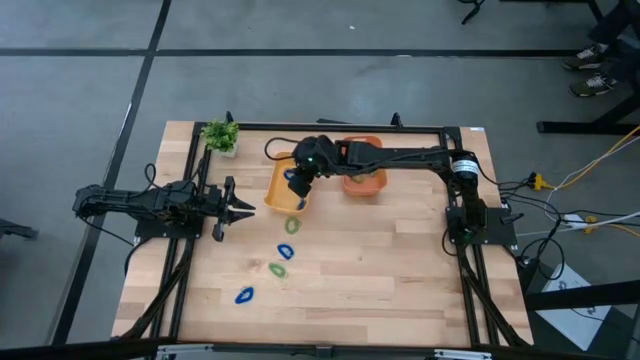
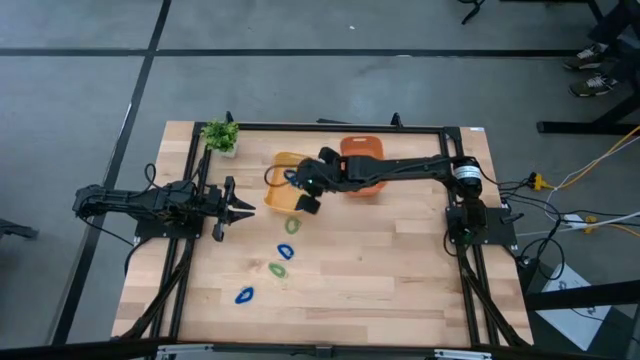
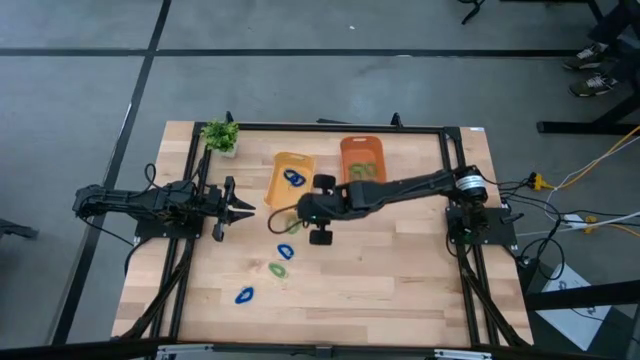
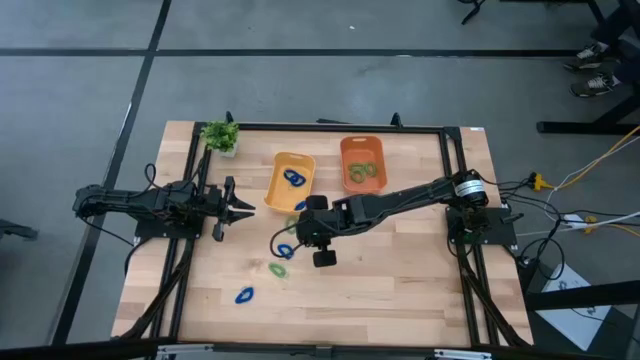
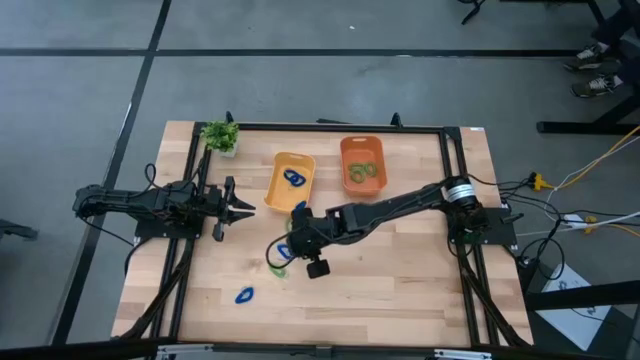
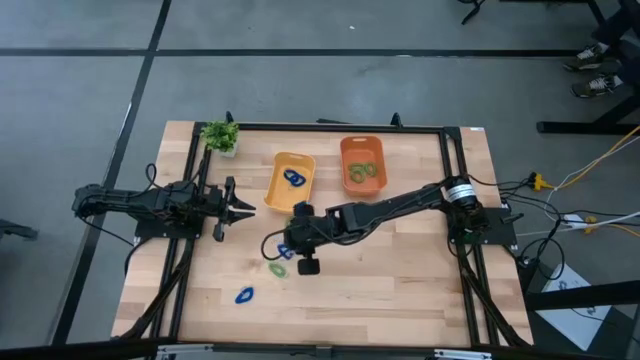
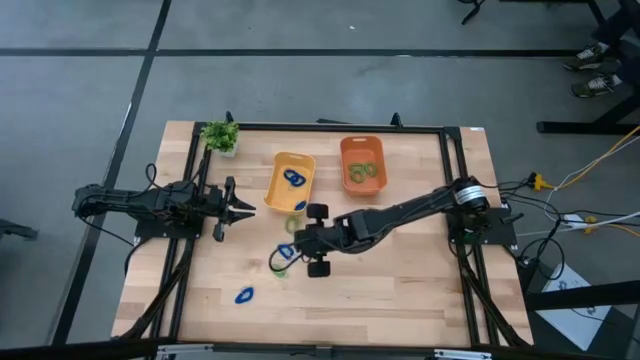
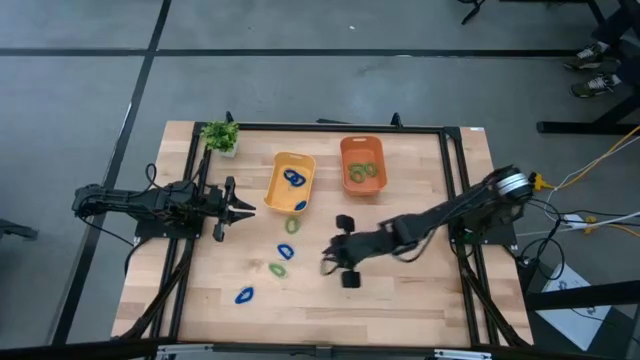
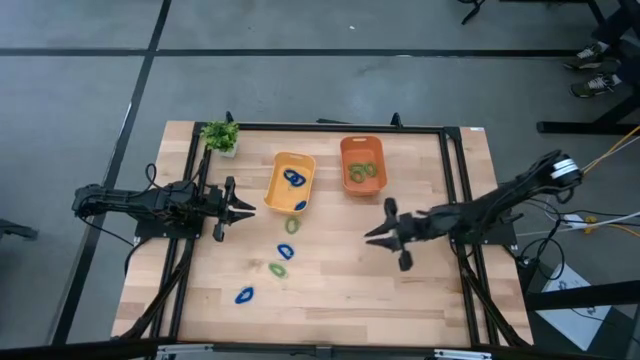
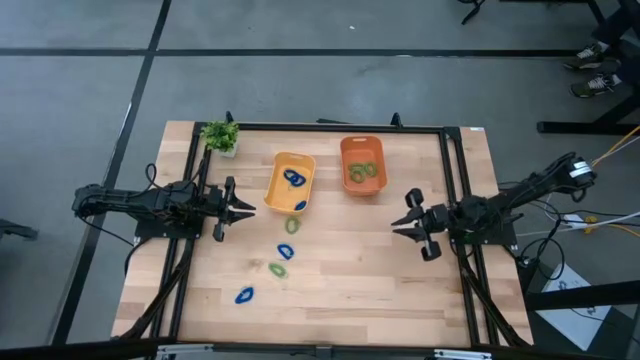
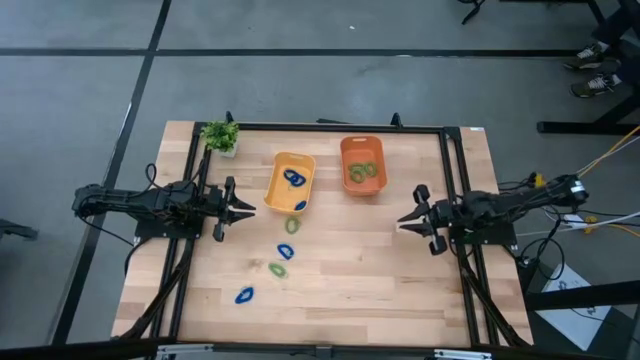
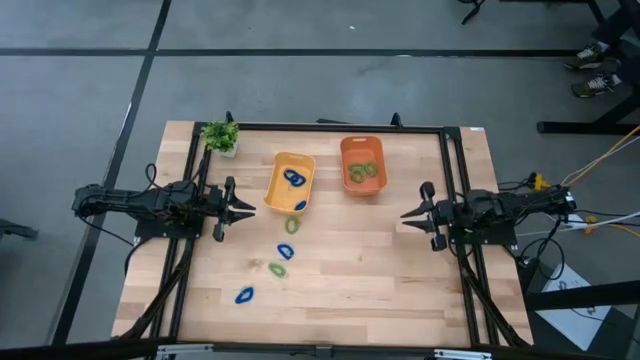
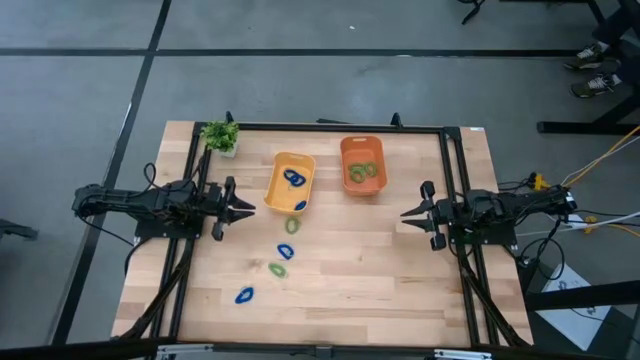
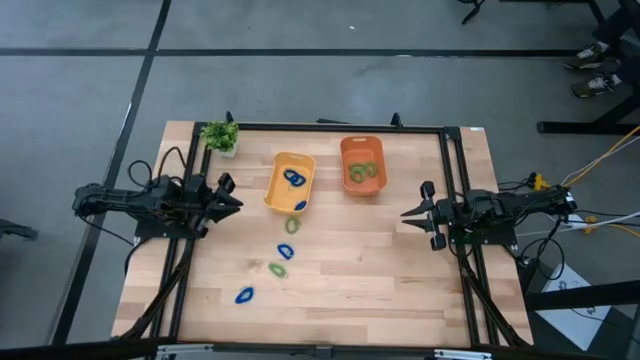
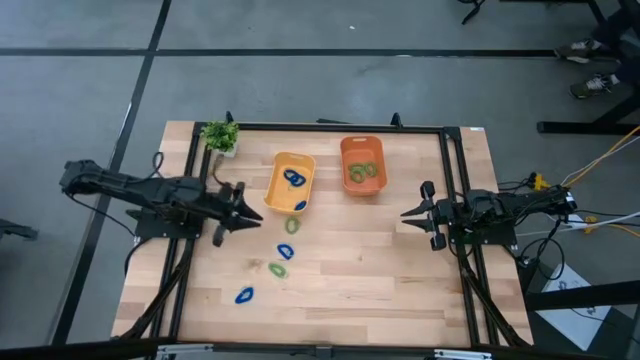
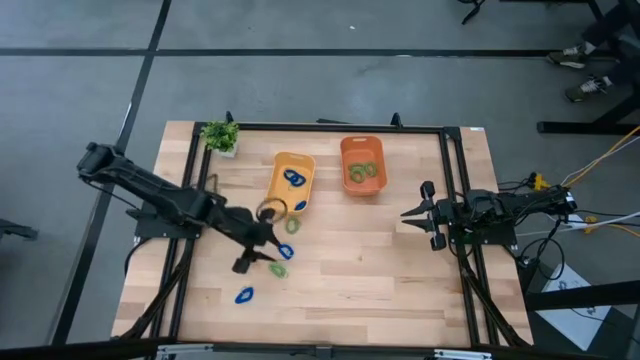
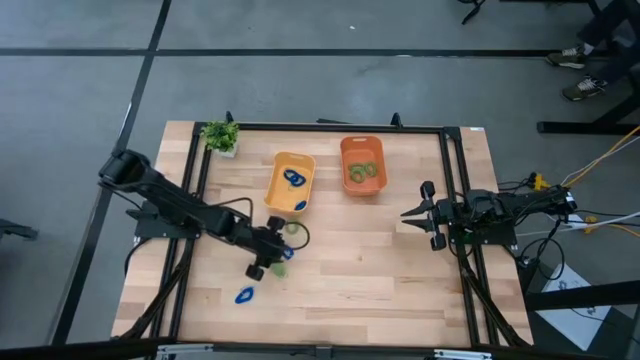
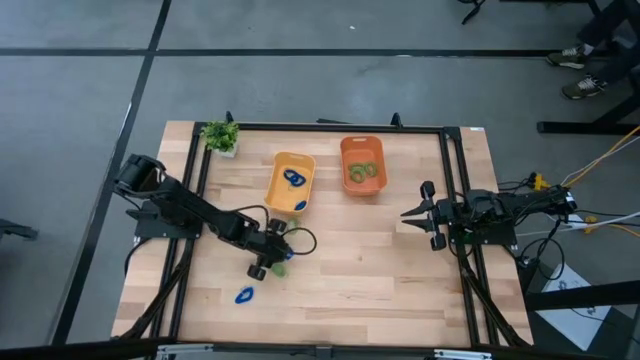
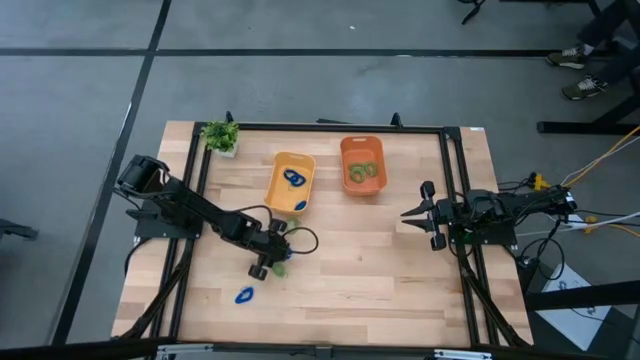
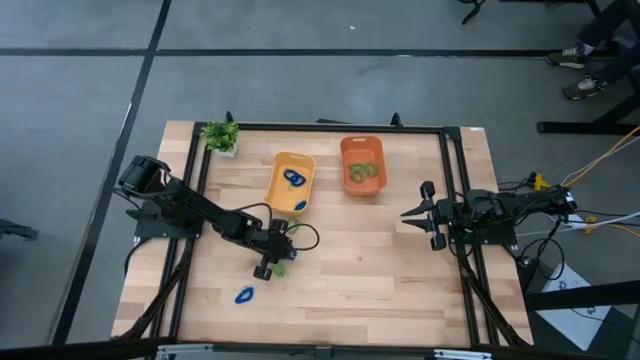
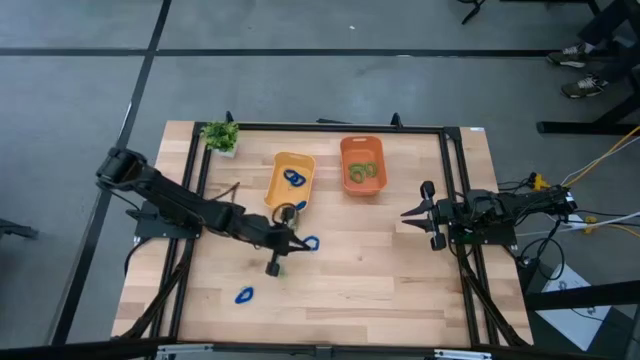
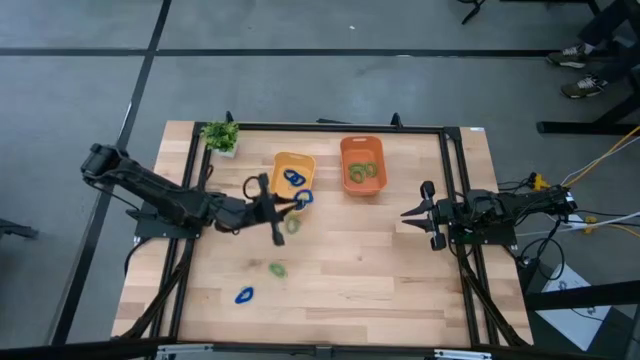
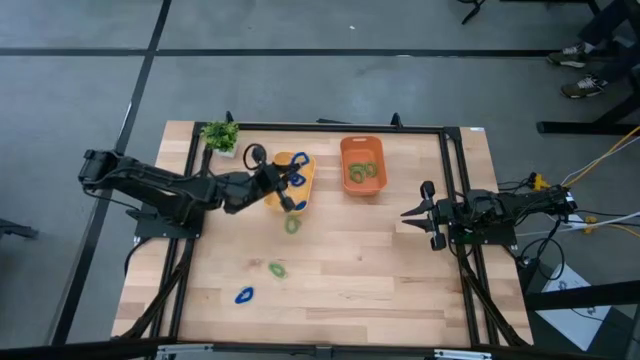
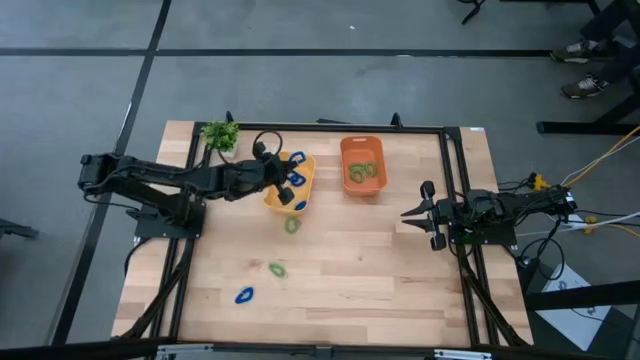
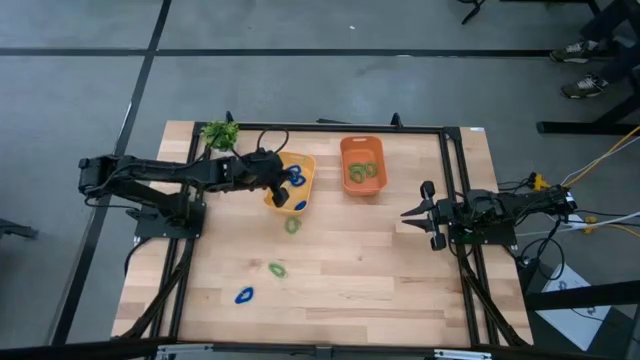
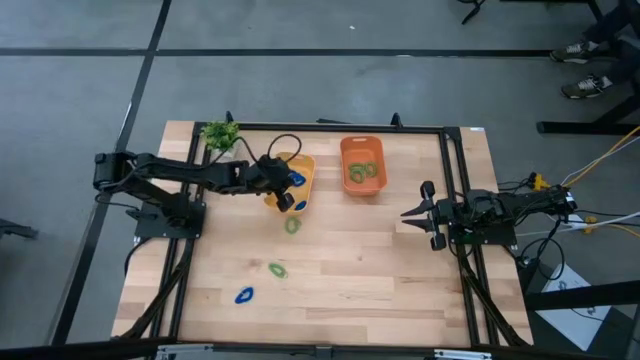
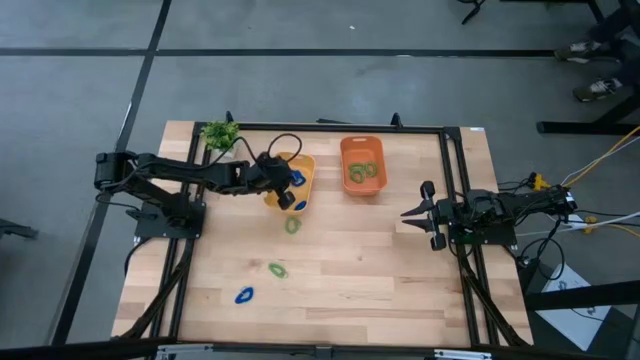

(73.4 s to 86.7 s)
Task: Sort items
Put the blue keychain into the yellow bin

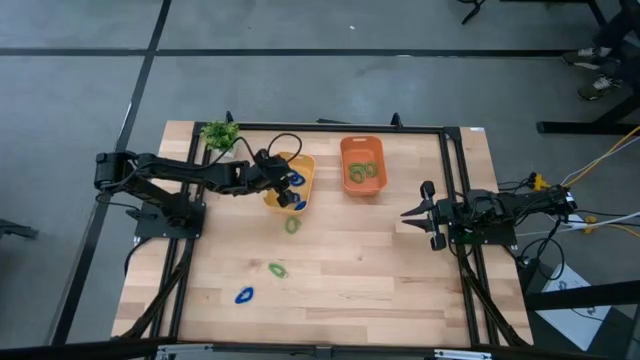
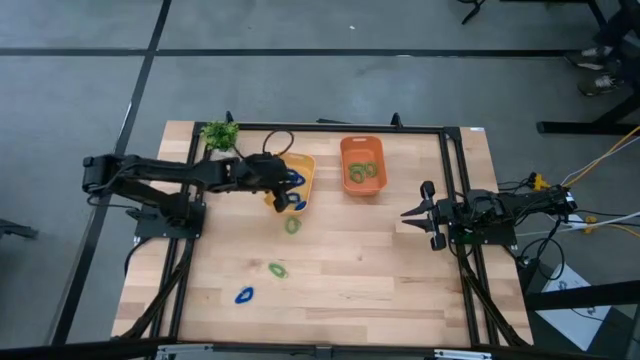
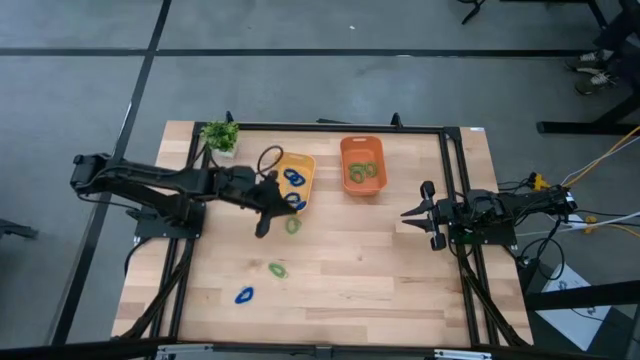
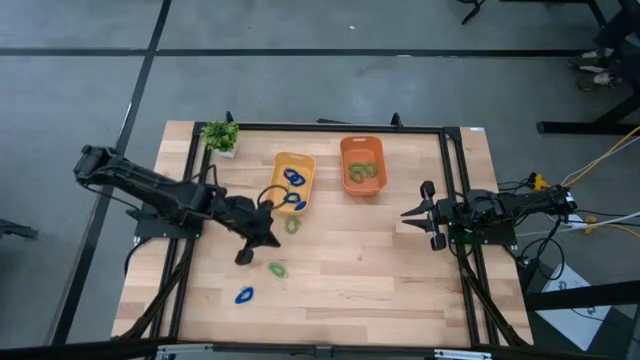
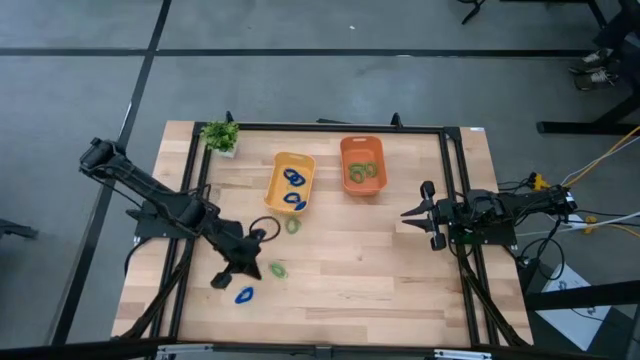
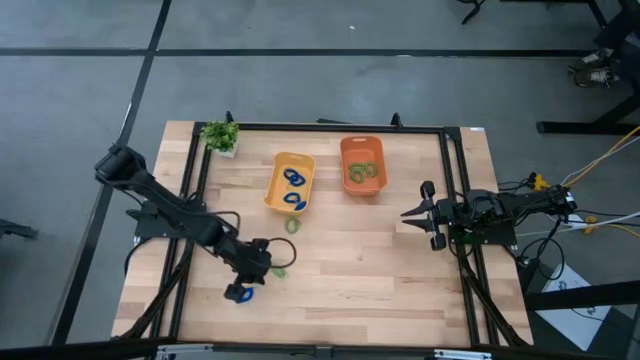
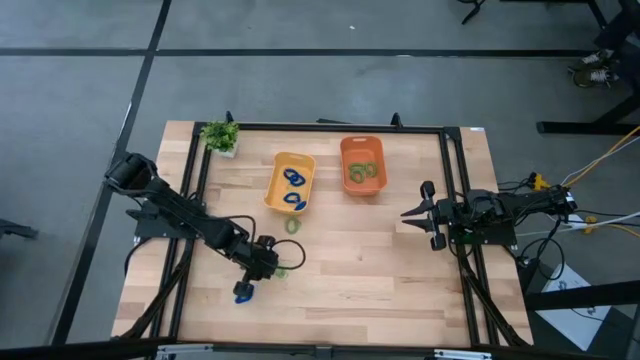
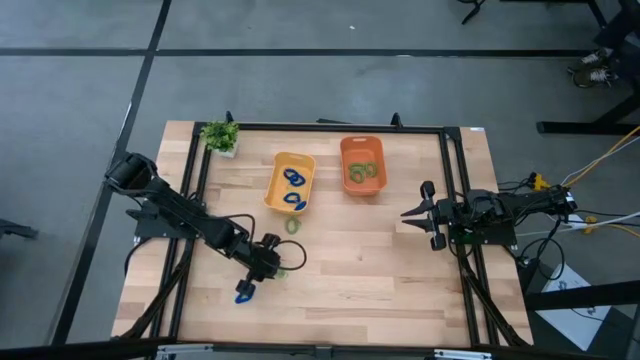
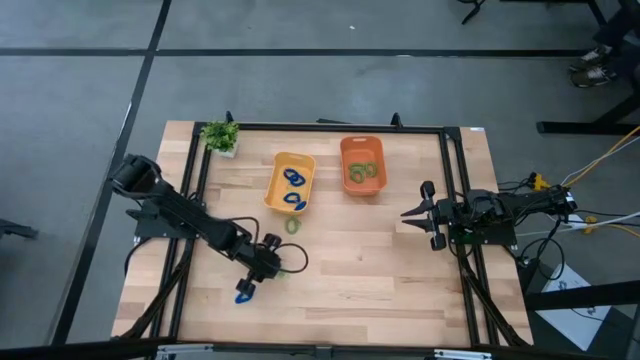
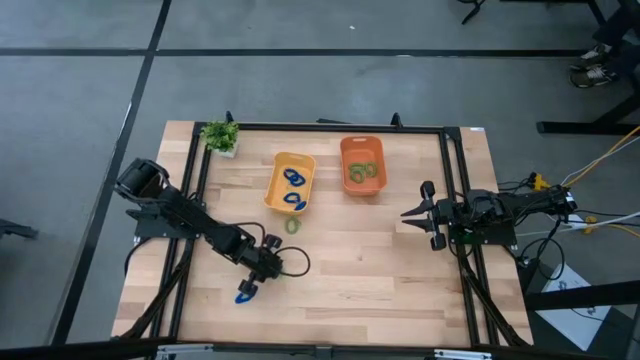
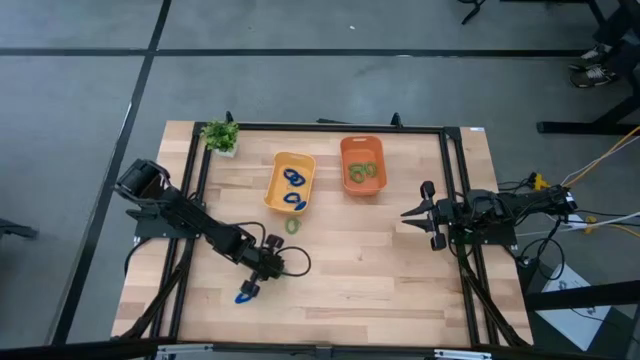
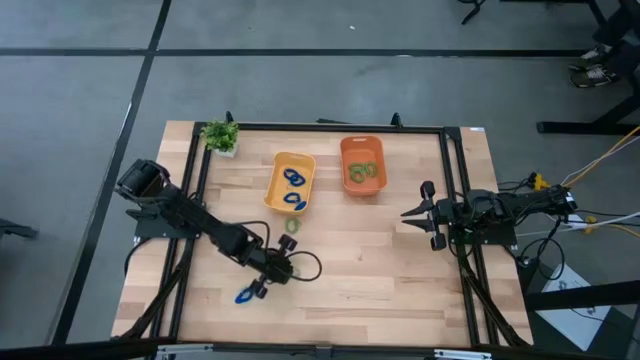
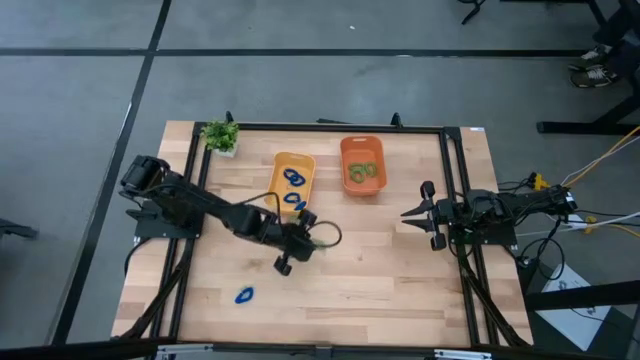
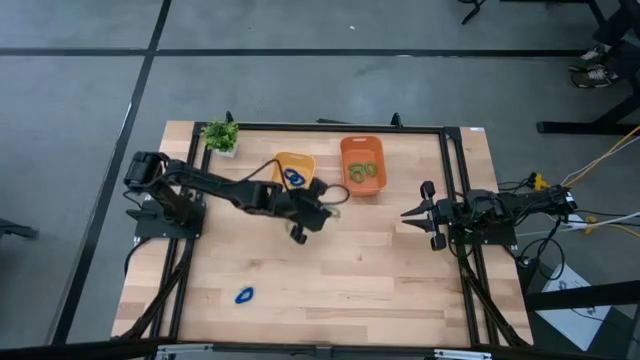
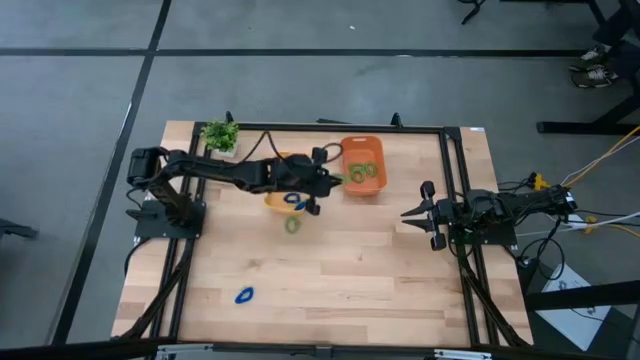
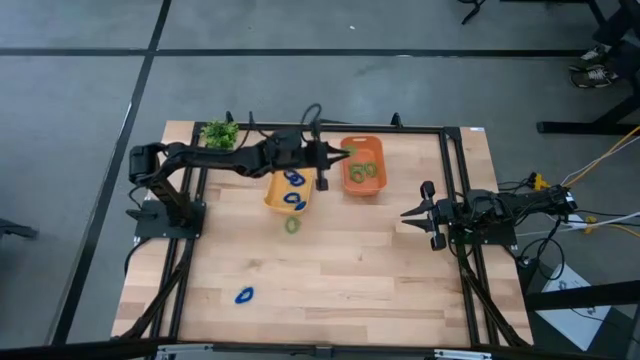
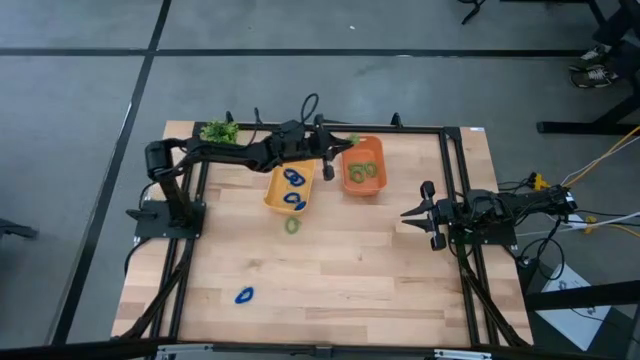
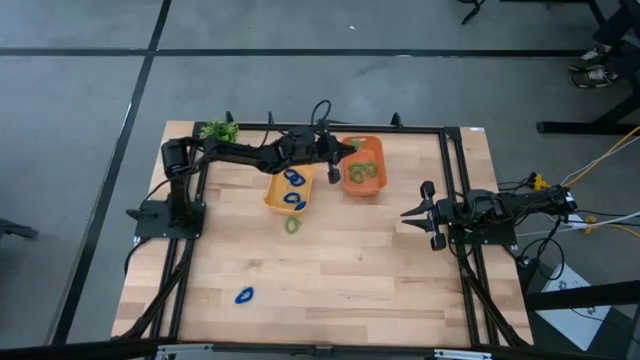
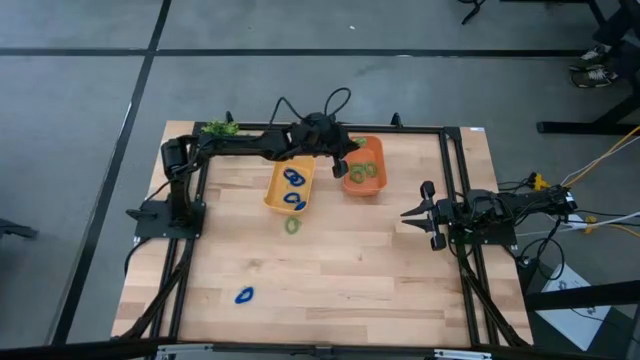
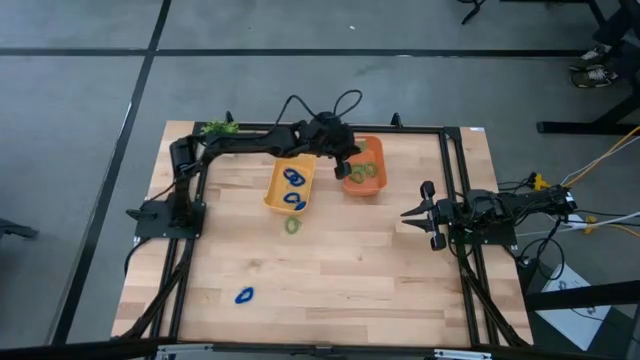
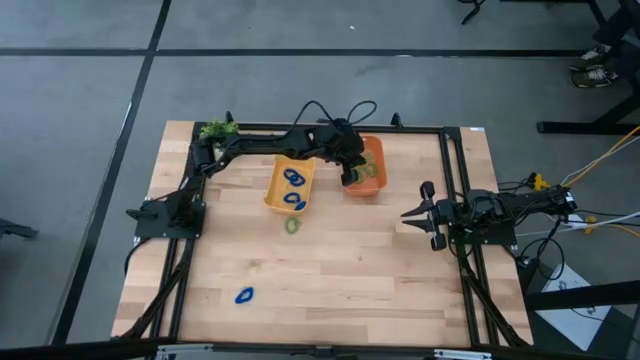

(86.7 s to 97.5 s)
Put the green keychain into the orange bin
